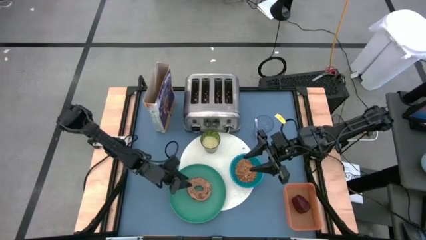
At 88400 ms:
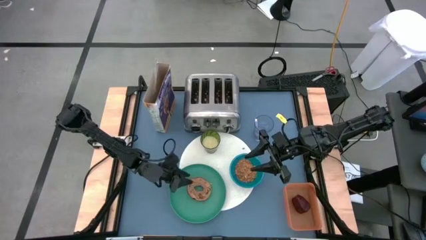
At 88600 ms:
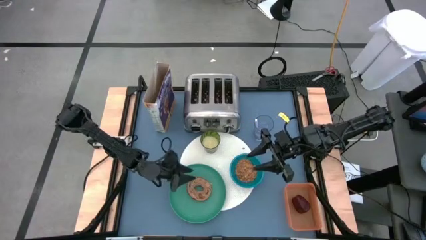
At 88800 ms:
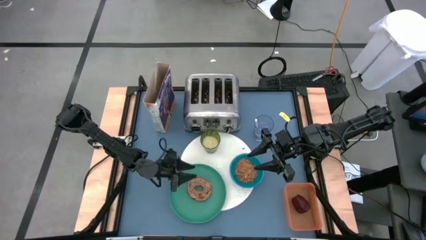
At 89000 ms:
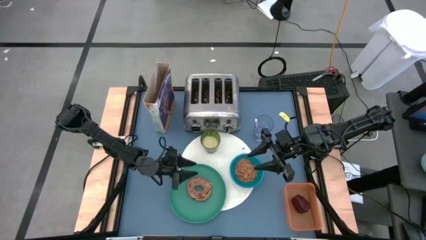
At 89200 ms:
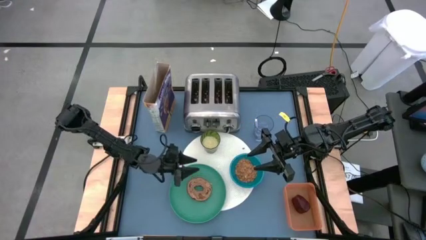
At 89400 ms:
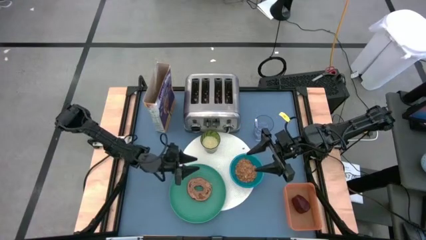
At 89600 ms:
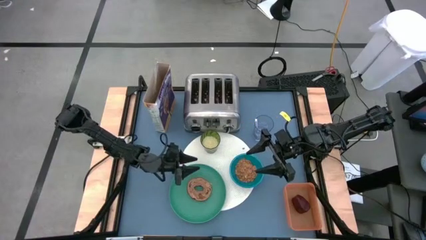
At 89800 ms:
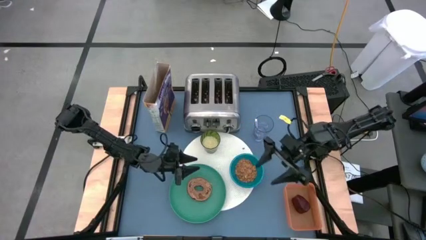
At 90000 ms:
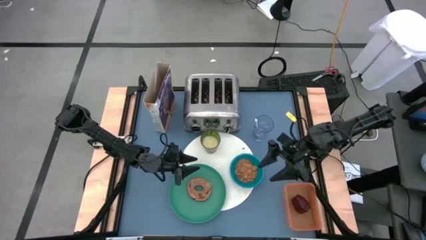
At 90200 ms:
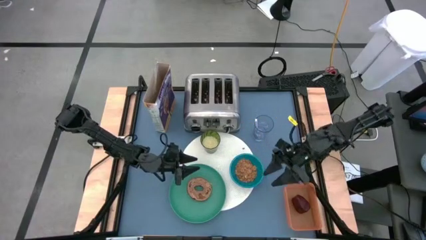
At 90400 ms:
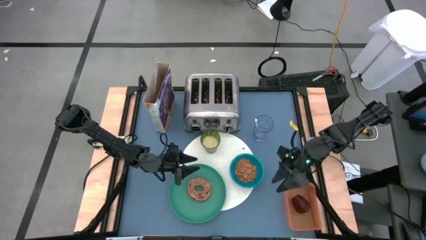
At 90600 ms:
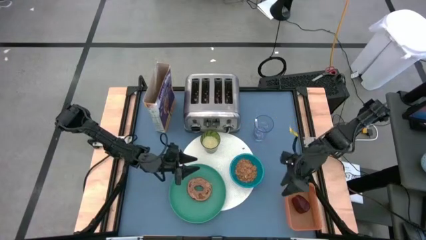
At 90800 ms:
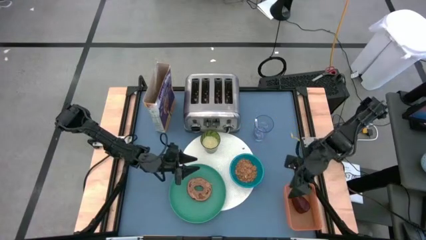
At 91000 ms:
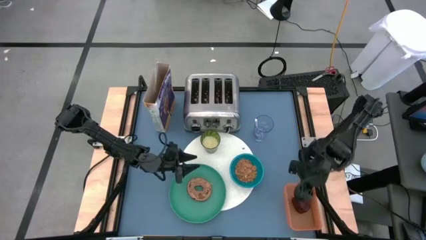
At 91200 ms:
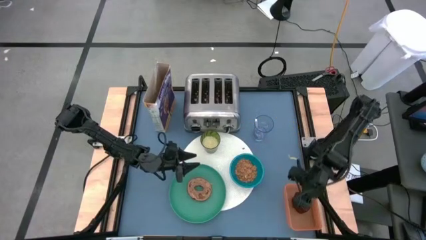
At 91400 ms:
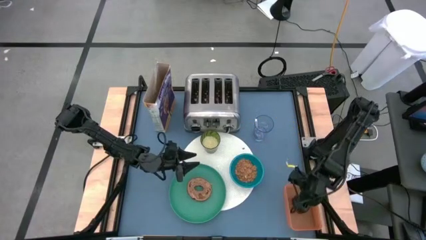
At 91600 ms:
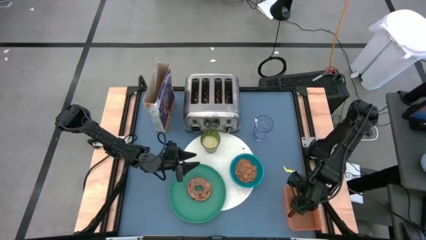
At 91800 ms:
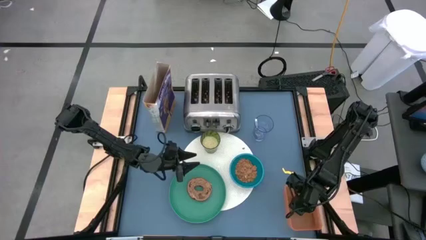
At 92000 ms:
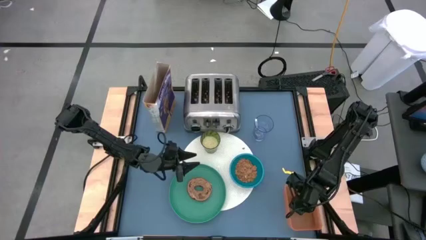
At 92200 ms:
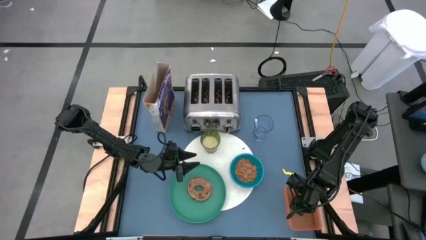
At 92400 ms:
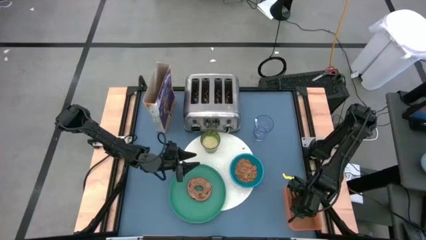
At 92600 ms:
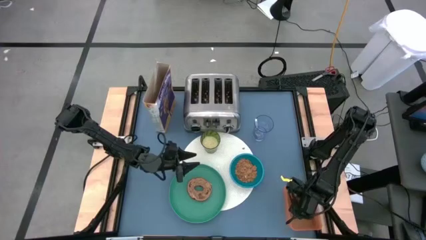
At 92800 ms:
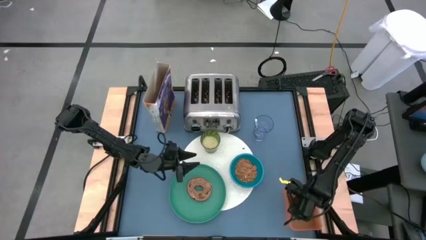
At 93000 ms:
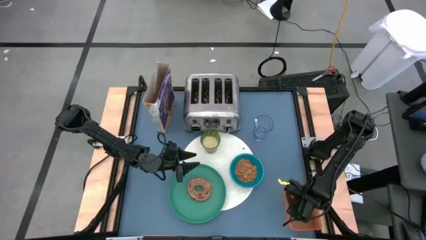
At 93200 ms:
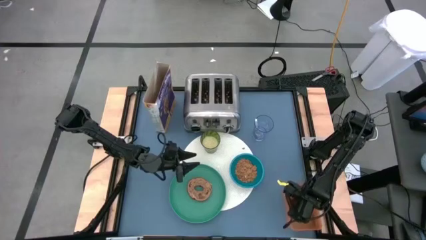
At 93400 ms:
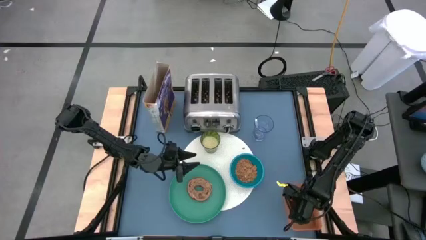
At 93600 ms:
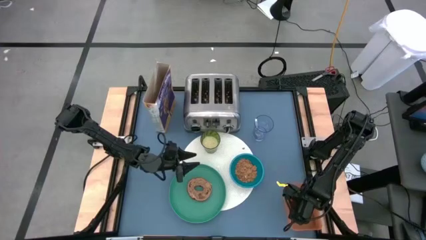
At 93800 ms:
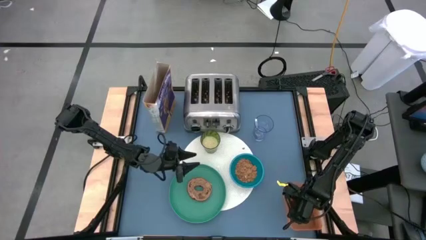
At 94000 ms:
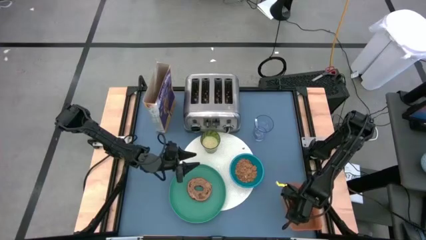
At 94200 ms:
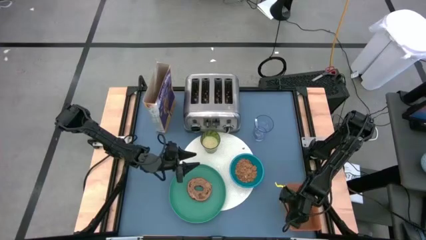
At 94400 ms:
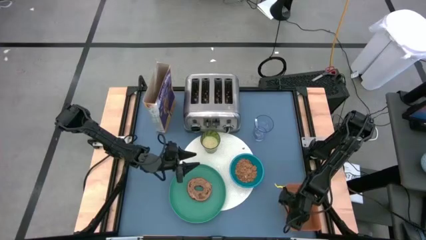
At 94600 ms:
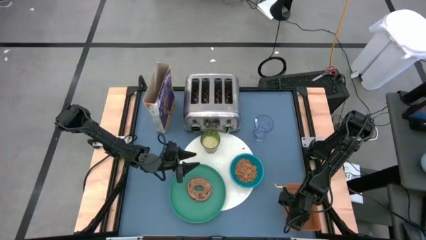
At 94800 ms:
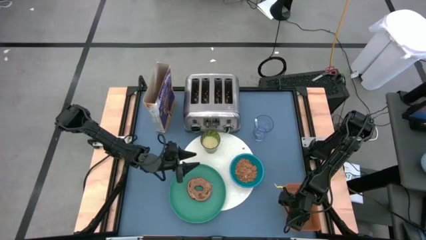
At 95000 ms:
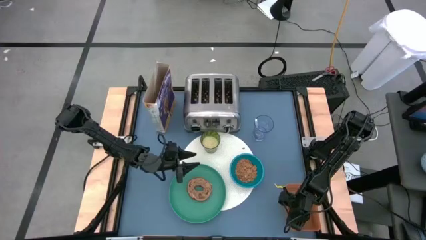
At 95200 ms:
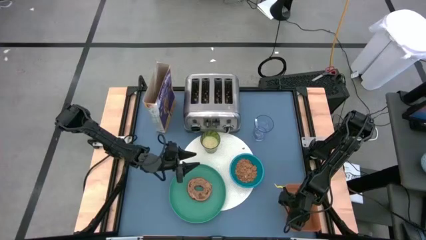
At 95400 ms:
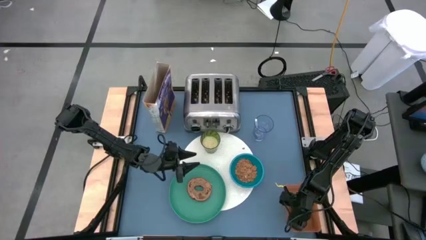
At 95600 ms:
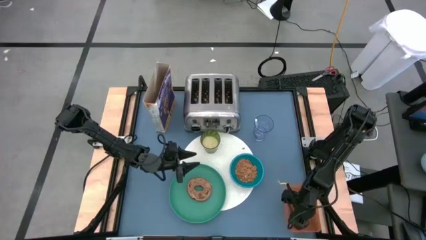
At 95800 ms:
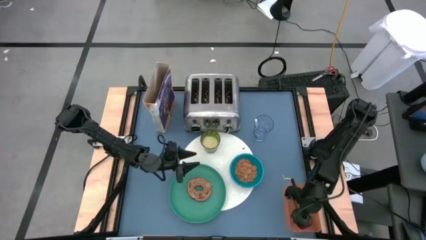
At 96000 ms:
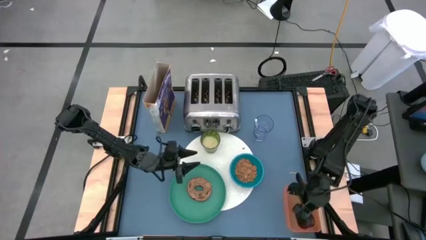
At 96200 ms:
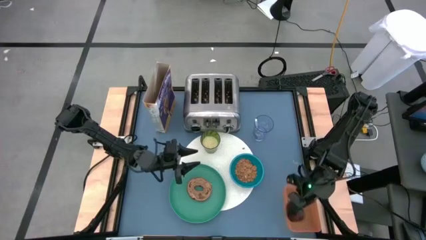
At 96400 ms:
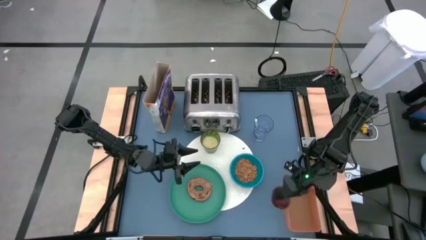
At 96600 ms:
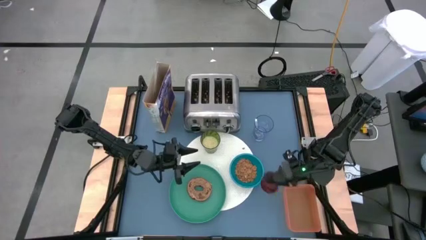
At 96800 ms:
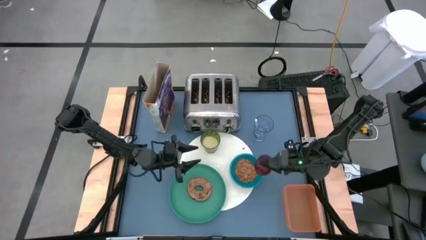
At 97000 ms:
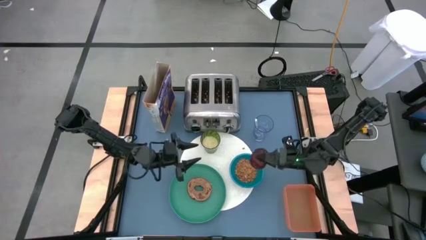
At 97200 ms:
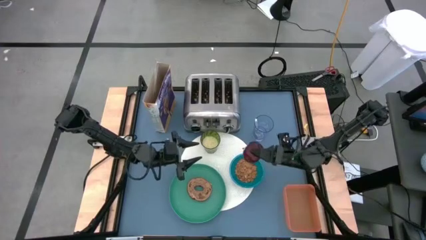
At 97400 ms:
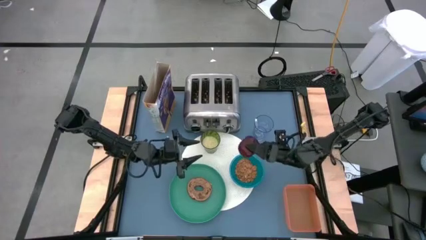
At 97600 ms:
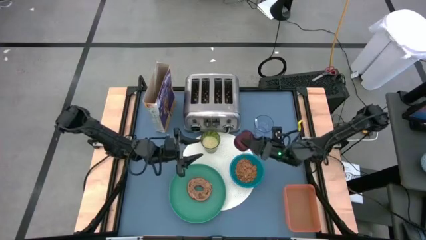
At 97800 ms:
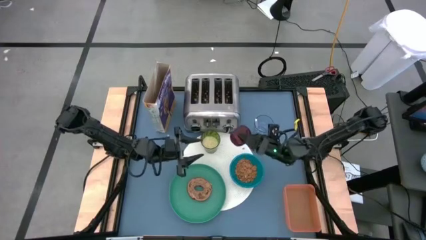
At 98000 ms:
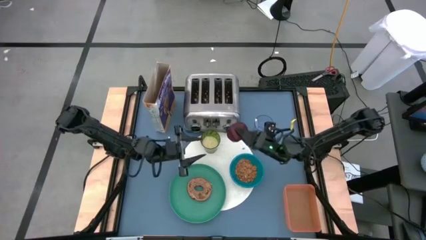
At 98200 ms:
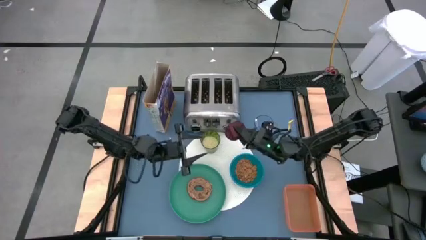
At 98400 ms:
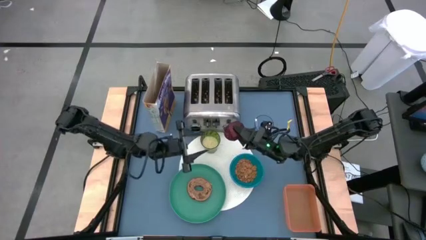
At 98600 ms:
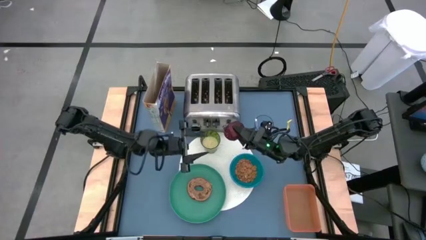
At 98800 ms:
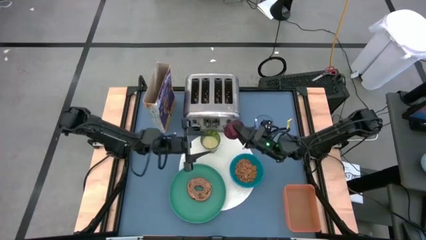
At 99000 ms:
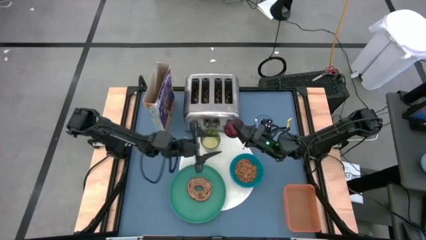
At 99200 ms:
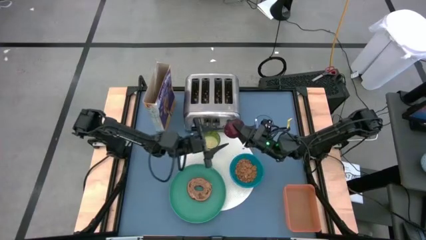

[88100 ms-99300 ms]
Task: Arrange a breakfast setting
Put the red apple to the top left of the placemat

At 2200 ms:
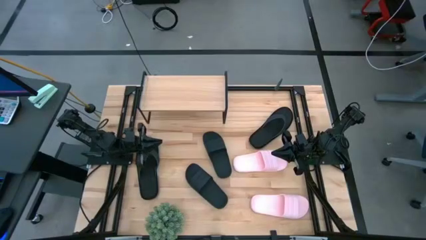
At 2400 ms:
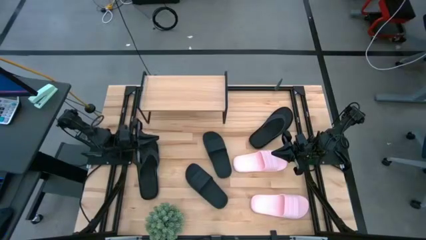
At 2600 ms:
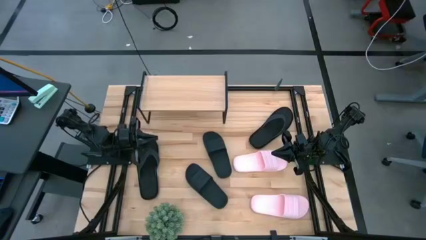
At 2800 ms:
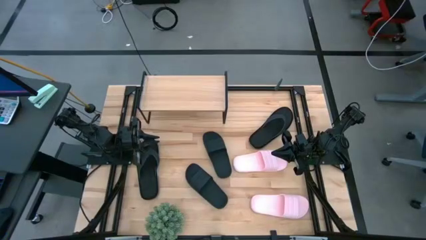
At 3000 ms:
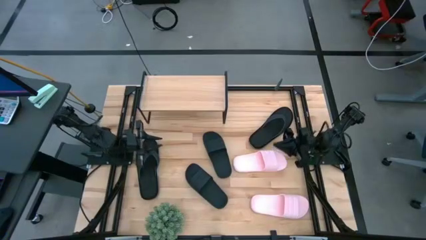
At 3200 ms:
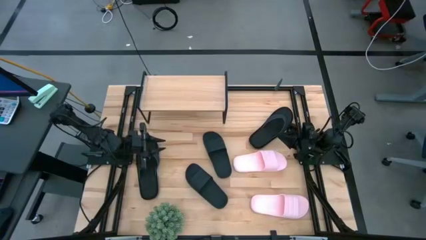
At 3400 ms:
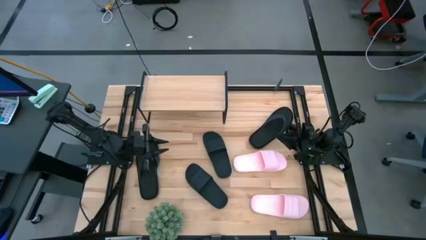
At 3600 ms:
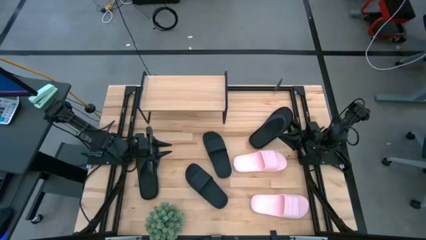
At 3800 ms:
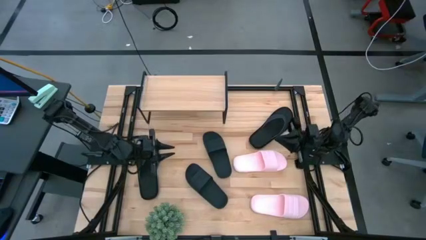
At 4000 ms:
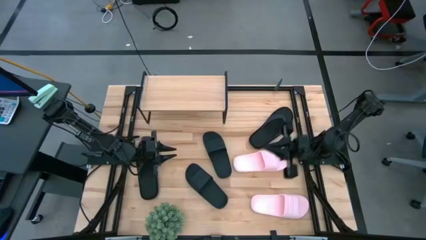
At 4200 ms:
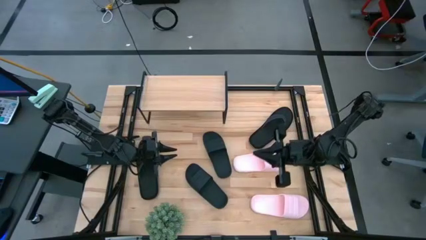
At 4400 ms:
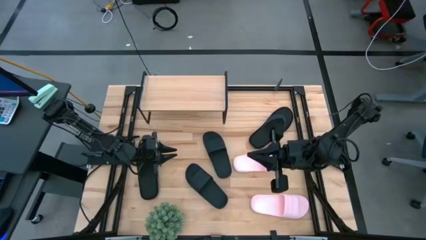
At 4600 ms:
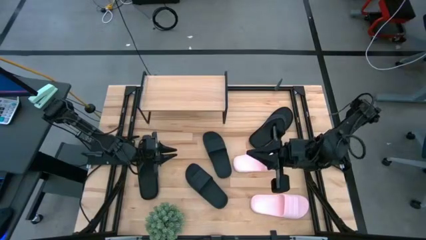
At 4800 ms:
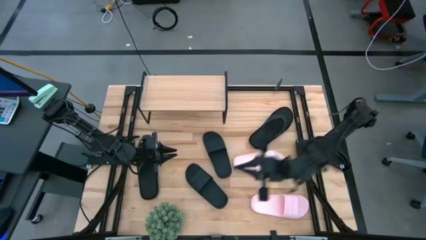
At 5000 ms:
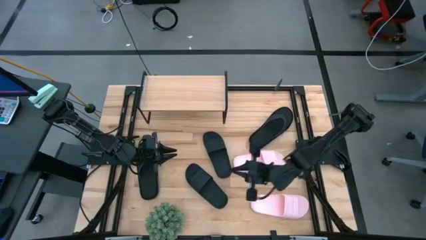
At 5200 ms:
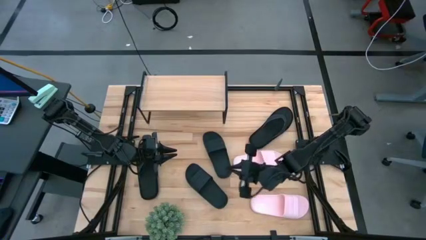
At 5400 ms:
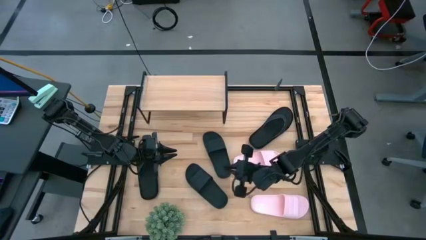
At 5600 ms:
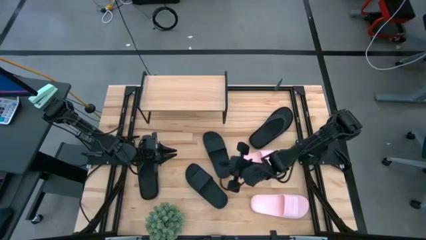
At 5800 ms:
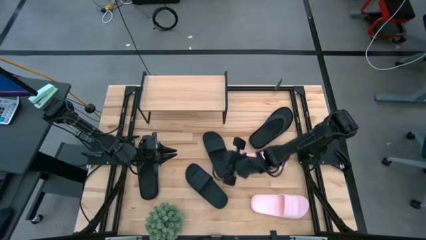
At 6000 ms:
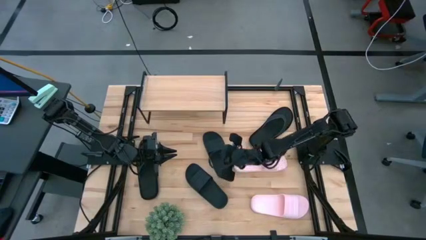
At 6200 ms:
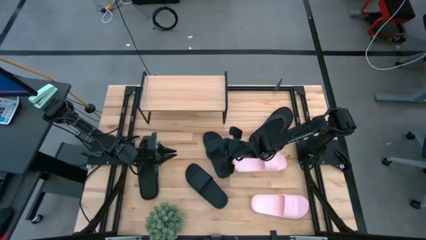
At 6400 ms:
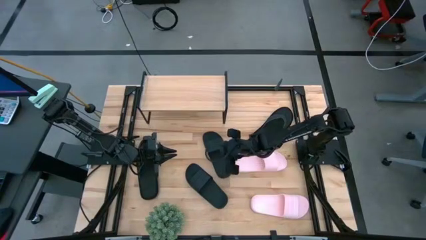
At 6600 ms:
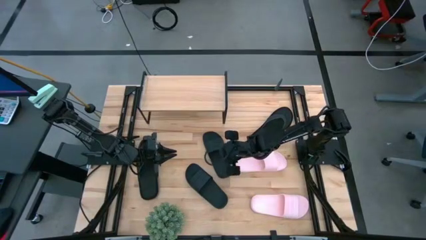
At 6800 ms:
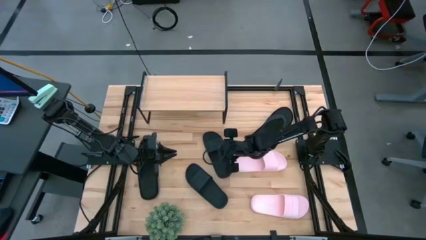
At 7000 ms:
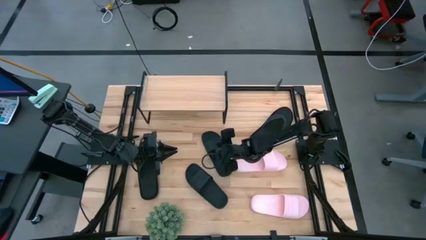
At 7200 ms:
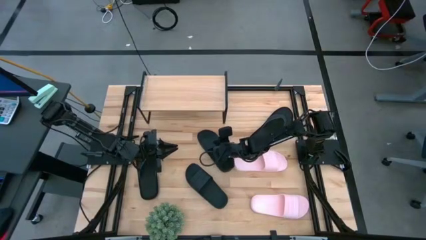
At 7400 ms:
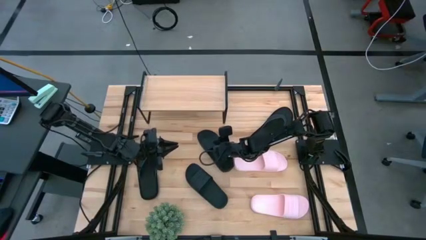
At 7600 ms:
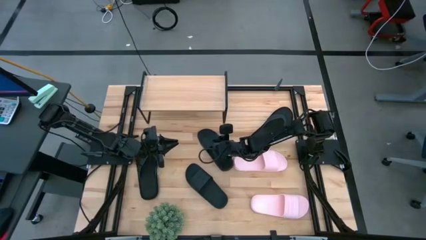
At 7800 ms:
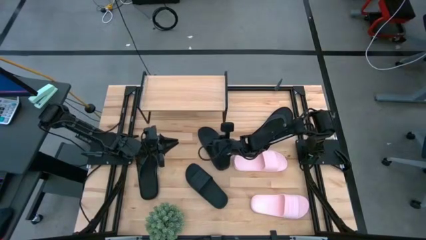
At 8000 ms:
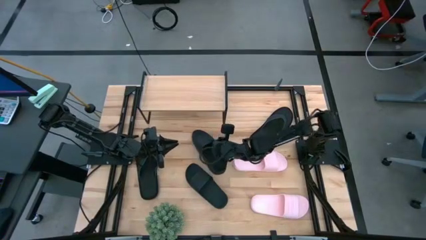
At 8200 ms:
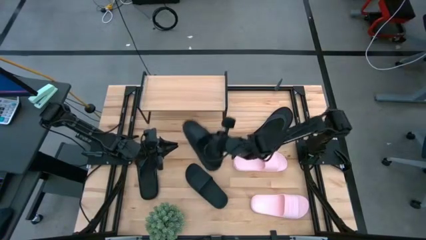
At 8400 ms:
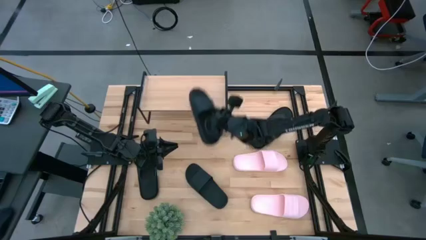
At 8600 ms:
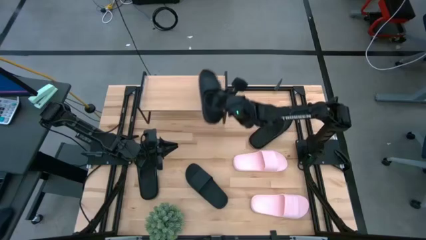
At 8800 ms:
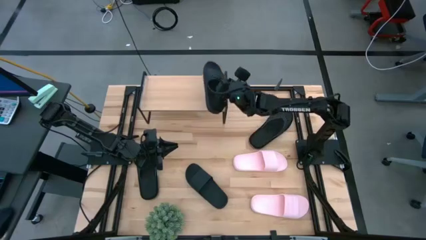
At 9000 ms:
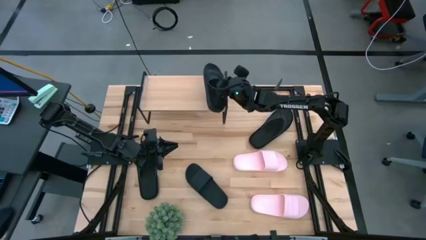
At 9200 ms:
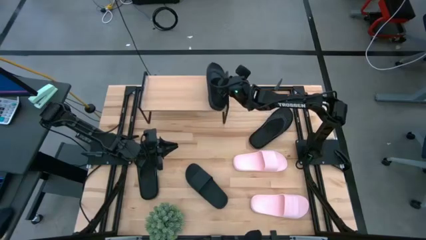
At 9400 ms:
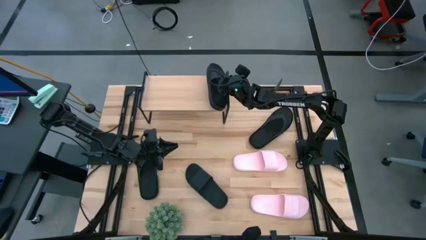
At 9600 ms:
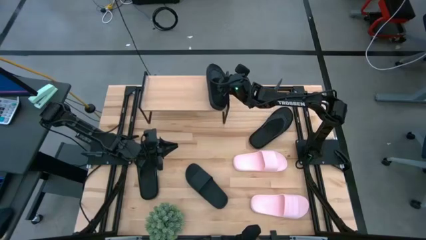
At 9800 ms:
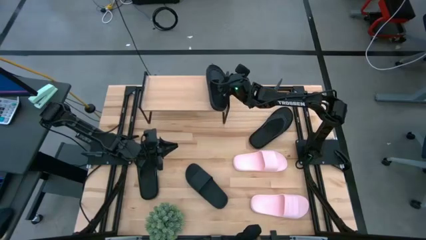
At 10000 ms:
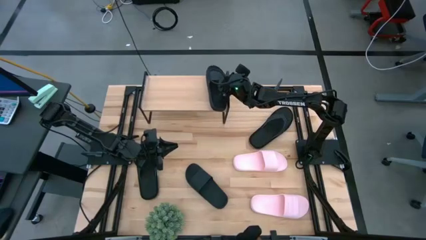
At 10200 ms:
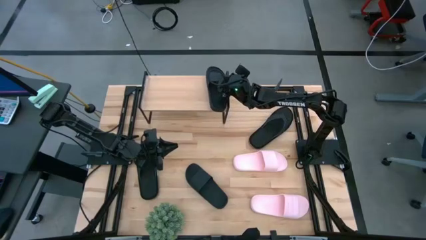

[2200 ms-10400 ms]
Task: Pick and place slides into the shelf
Put the top black slide on the shelf
